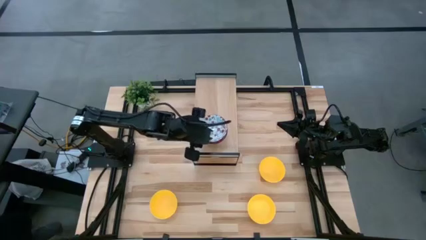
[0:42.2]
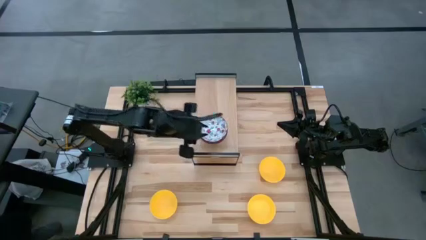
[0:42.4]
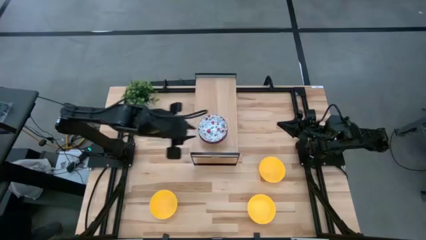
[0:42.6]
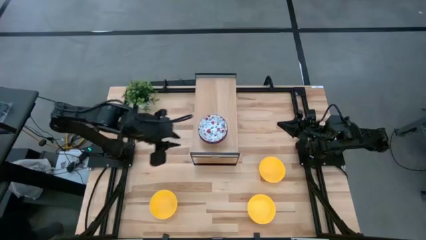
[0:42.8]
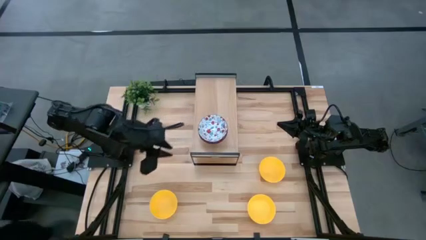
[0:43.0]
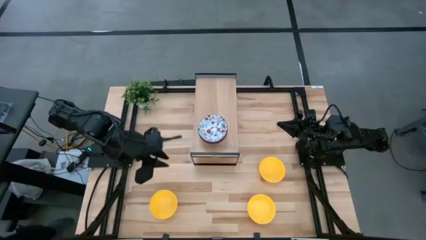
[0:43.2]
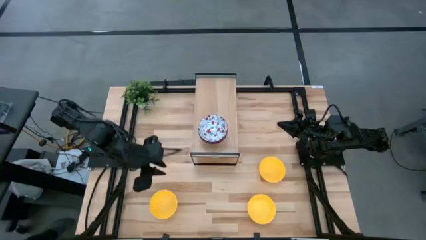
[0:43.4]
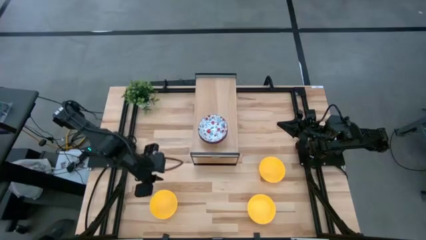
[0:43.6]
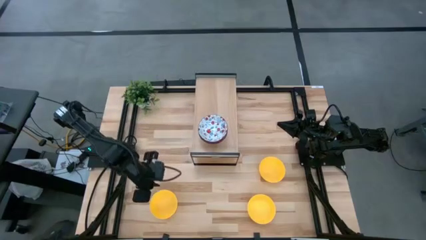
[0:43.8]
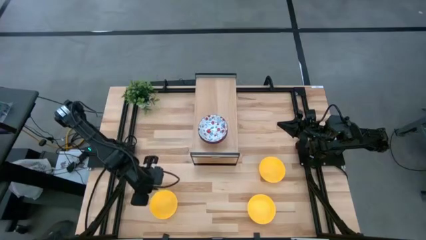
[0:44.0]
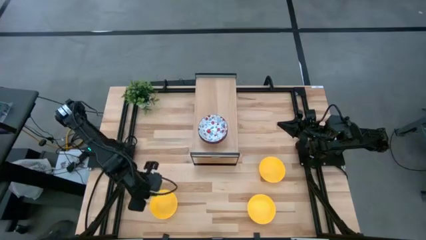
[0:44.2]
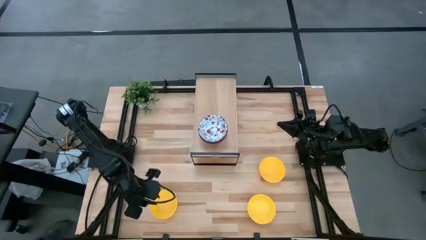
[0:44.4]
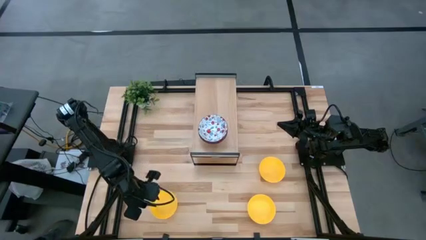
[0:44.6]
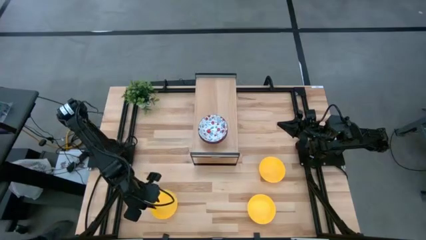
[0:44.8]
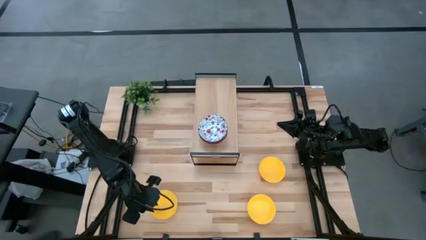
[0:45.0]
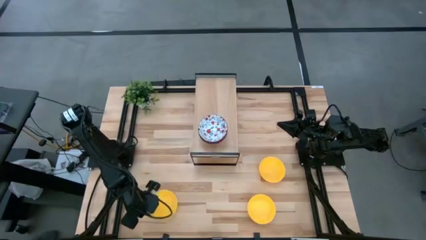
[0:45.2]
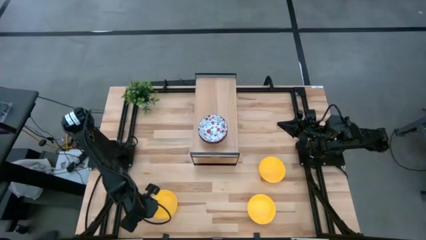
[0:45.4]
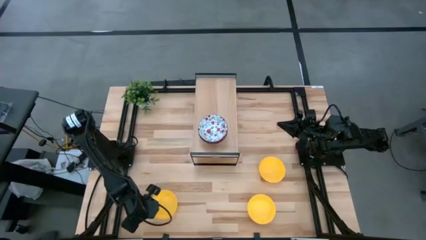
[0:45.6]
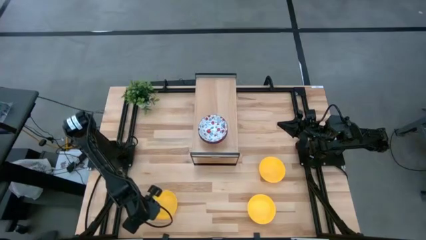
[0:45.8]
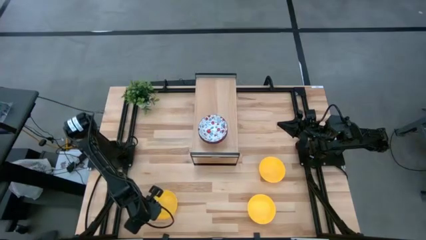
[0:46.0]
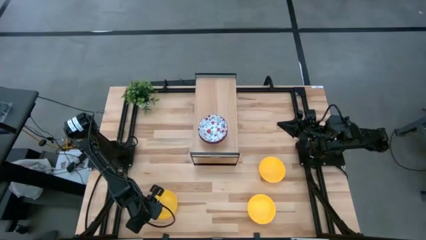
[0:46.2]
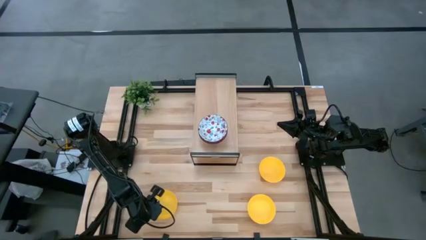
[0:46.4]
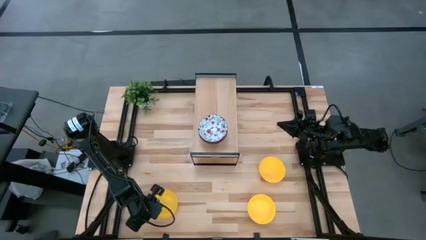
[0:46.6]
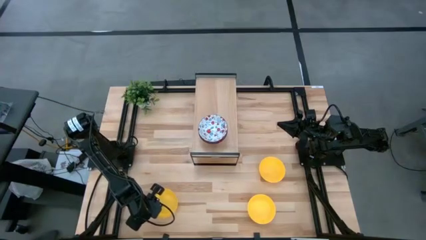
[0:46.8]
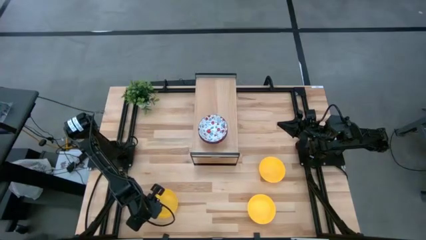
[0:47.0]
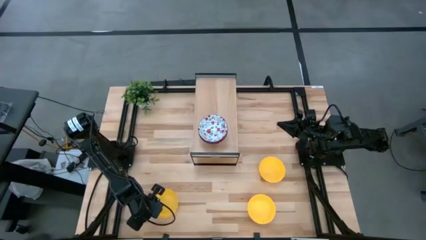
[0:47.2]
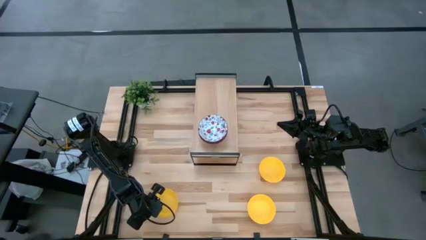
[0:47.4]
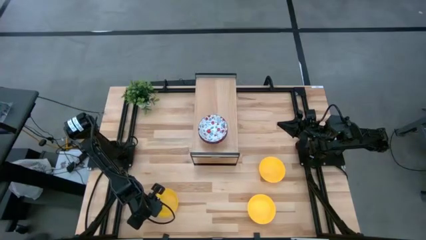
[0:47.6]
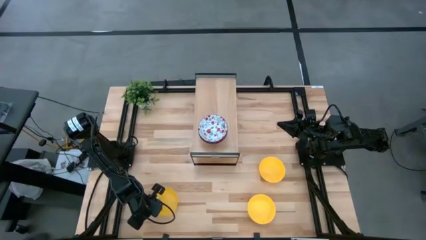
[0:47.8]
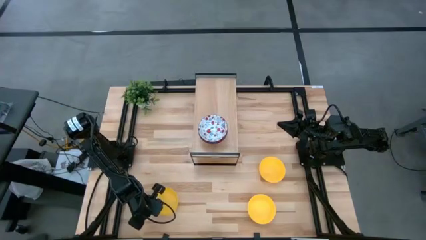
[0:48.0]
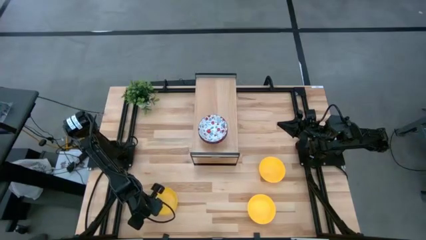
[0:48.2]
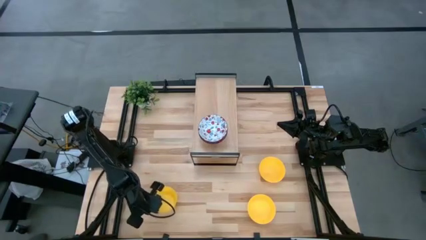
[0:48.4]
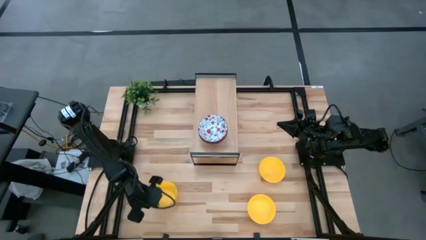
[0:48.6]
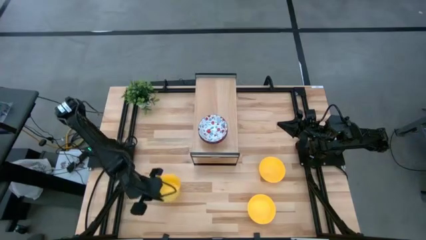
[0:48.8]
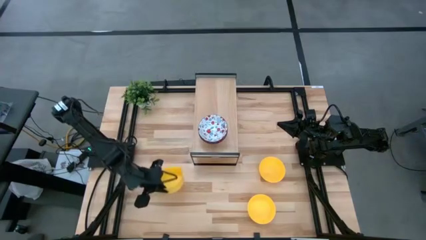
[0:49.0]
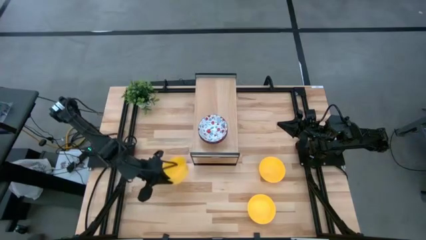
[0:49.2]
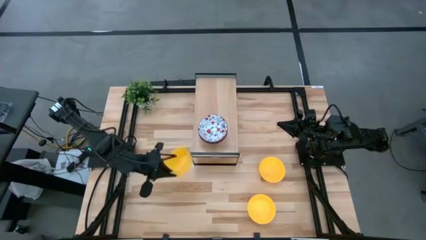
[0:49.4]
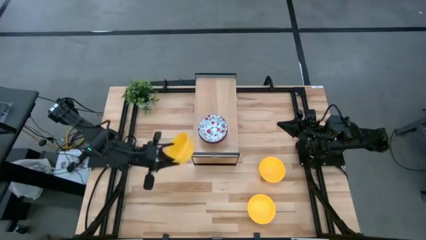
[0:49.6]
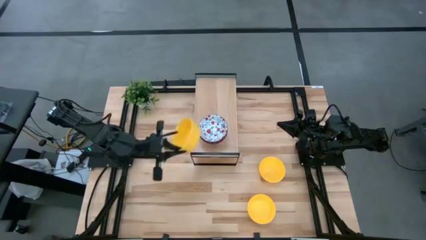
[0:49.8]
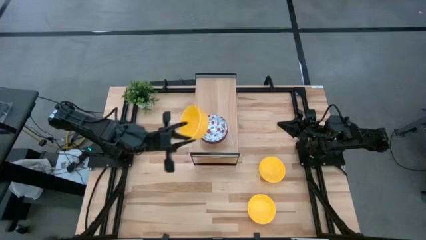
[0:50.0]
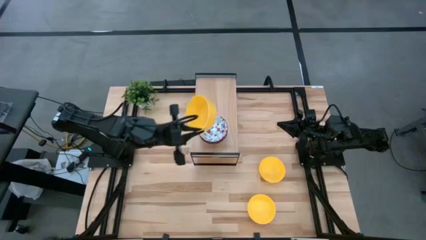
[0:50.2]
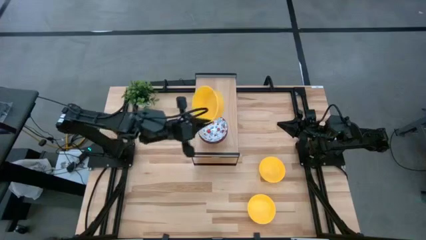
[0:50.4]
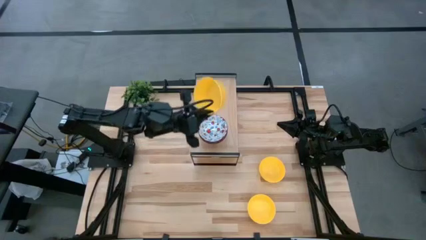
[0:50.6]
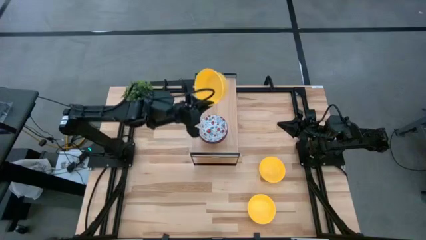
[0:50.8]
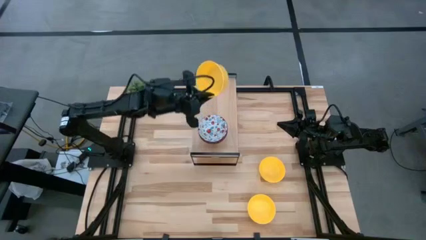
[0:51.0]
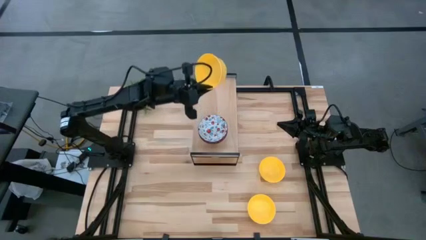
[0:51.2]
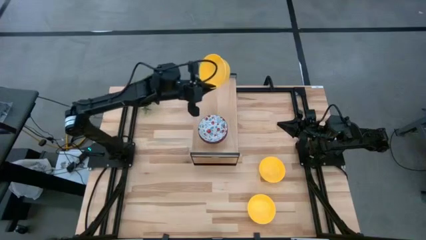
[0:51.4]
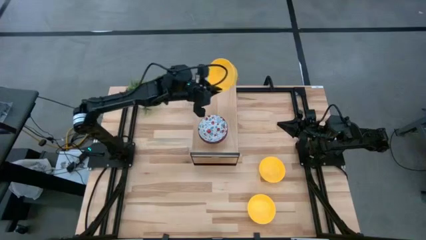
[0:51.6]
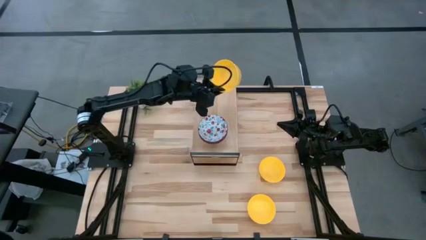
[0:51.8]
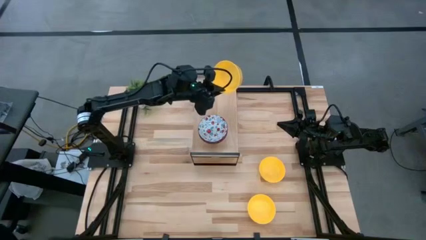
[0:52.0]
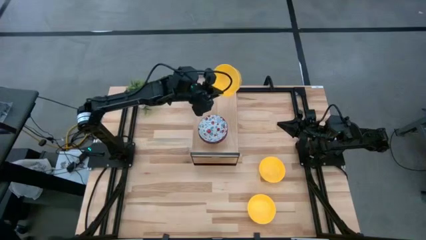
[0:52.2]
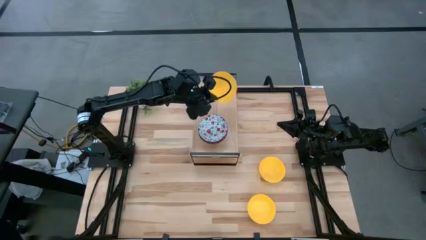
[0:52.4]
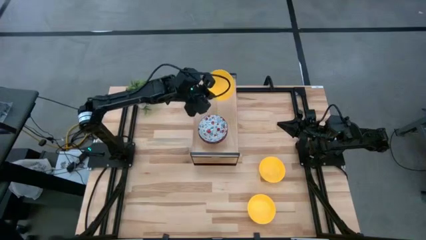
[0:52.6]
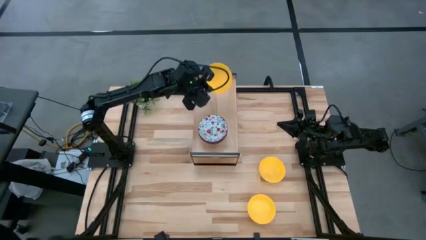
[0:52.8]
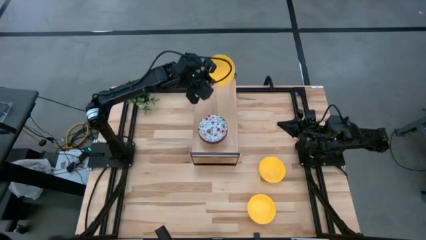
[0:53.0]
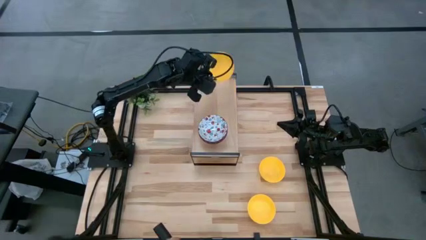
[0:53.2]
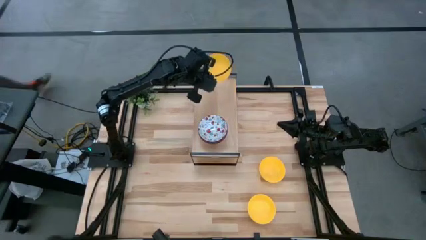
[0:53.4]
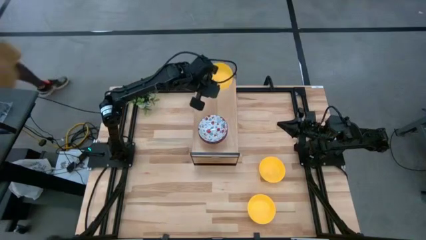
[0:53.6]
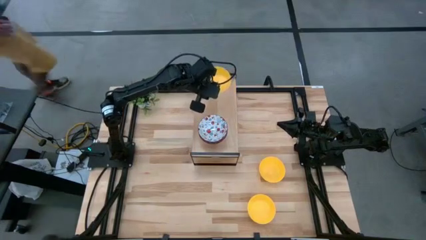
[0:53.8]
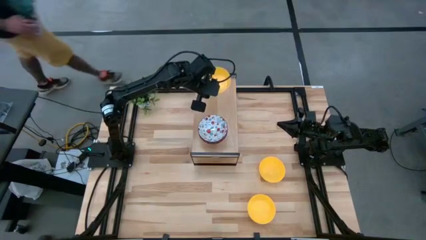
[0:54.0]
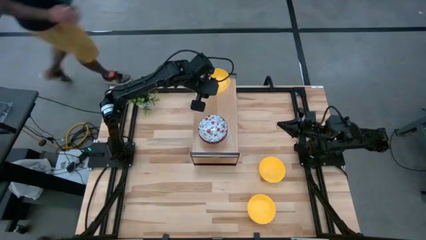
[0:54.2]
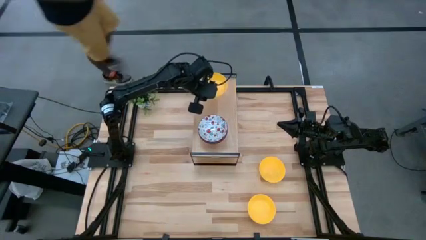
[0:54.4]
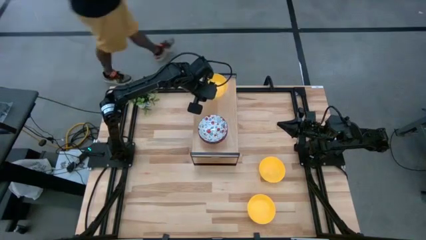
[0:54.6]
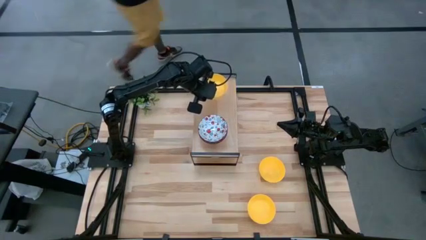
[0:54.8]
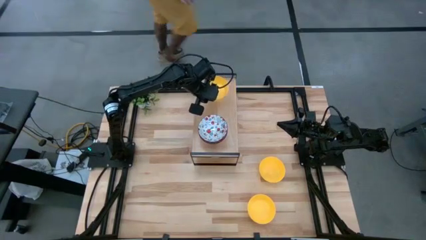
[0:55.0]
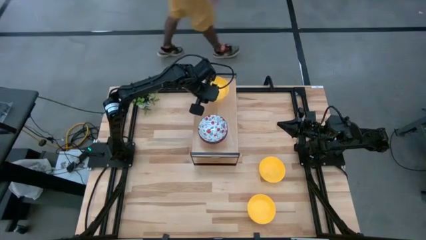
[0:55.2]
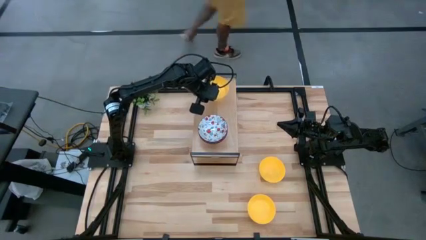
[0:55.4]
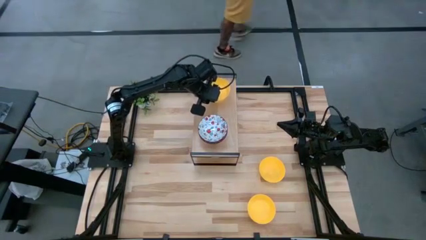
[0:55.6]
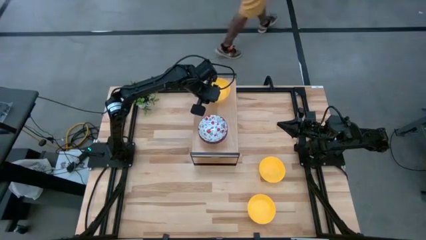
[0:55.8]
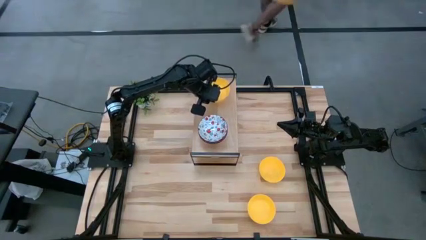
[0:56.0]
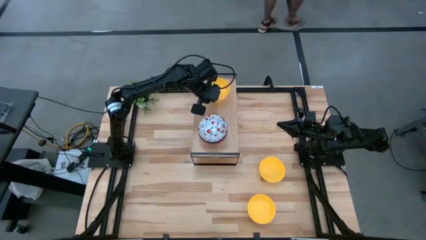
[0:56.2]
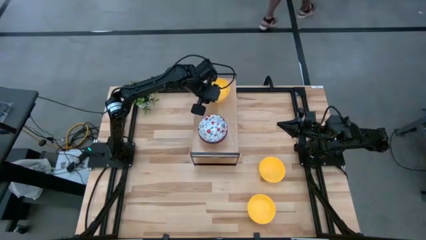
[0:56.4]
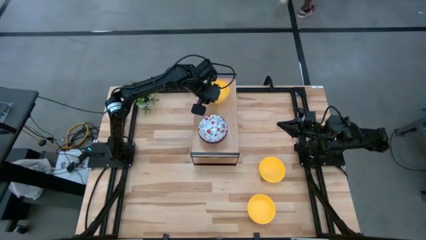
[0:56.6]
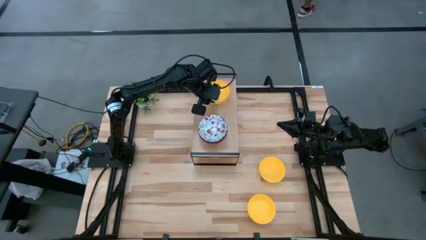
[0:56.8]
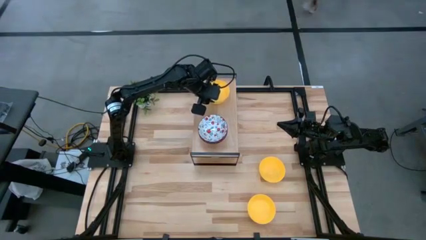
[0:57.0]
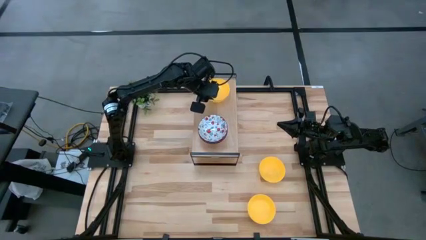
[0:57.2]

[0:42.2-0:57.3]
Task: Pick & Place Mini bowls
Put the bottom left yellow bowl on the shelf
